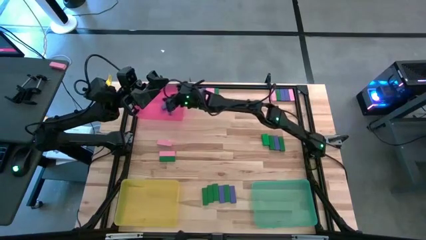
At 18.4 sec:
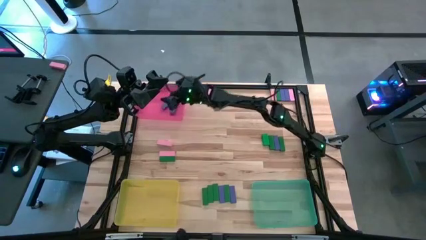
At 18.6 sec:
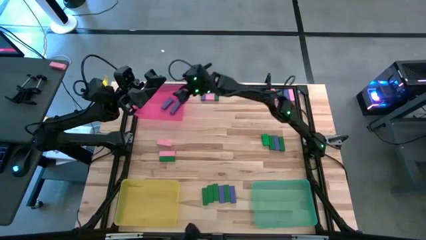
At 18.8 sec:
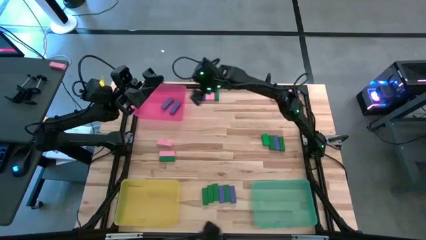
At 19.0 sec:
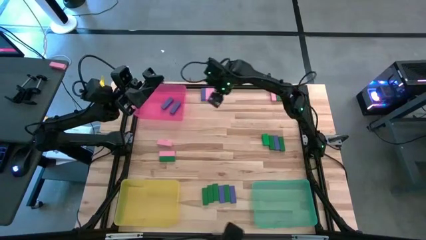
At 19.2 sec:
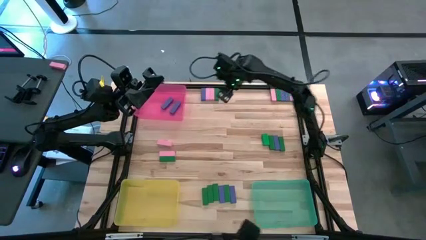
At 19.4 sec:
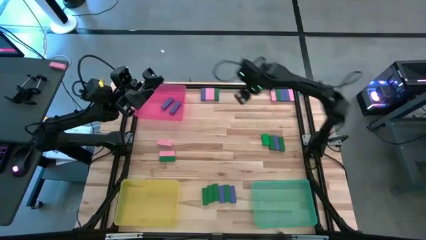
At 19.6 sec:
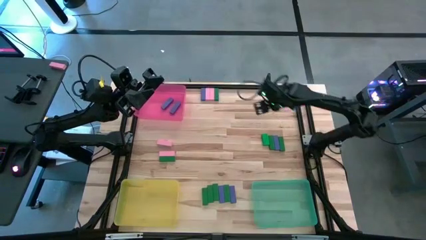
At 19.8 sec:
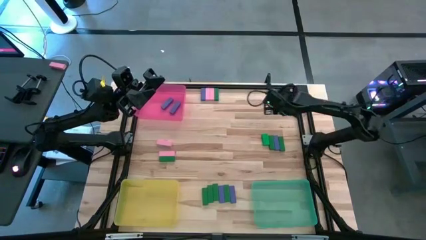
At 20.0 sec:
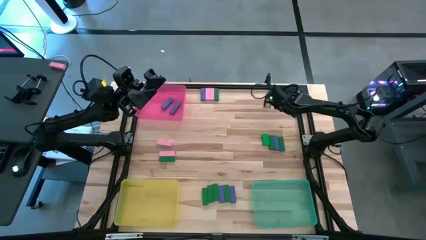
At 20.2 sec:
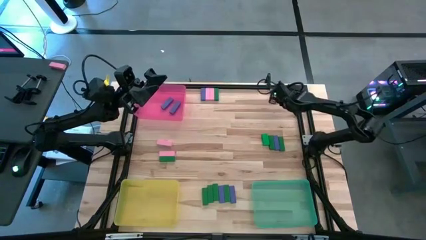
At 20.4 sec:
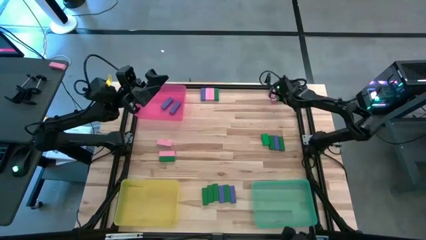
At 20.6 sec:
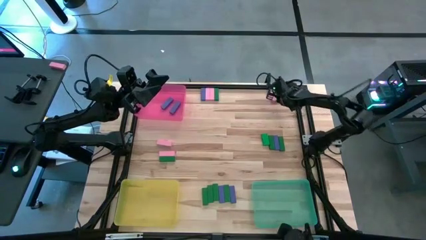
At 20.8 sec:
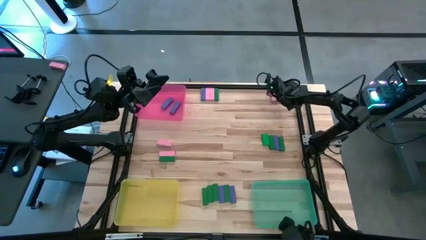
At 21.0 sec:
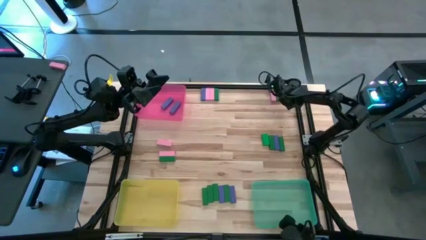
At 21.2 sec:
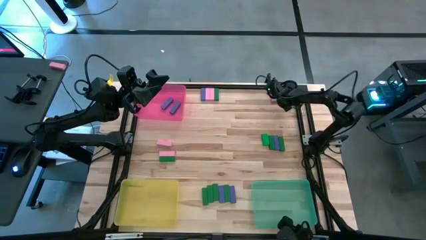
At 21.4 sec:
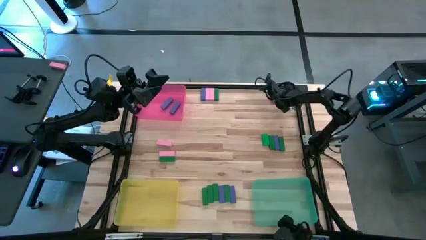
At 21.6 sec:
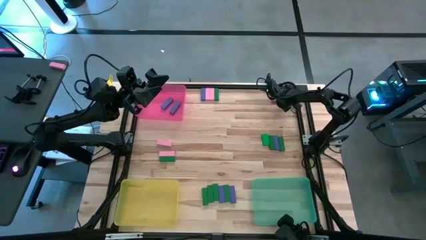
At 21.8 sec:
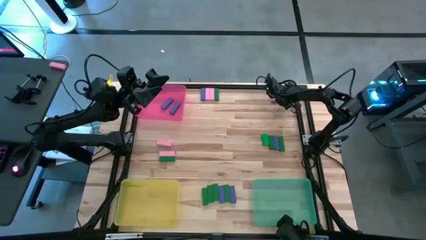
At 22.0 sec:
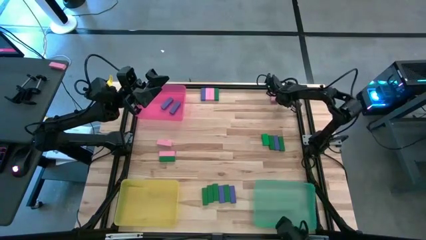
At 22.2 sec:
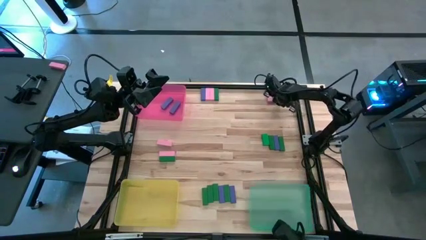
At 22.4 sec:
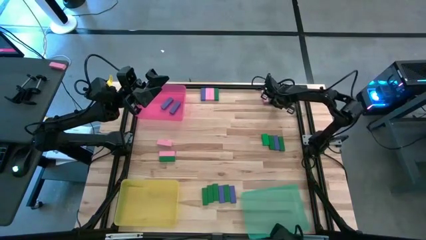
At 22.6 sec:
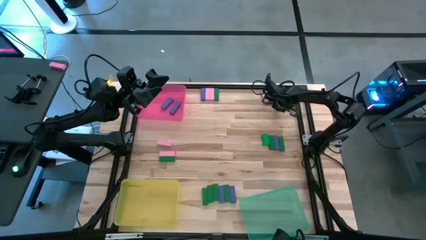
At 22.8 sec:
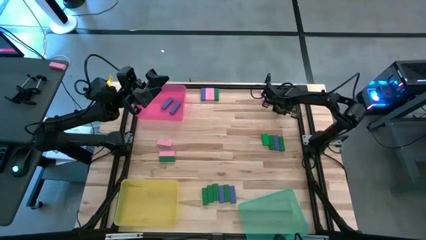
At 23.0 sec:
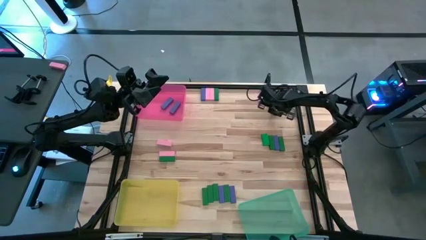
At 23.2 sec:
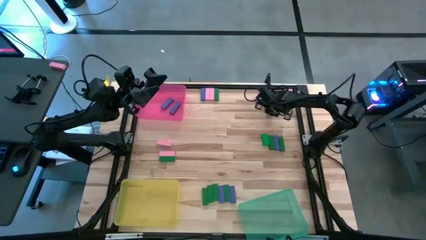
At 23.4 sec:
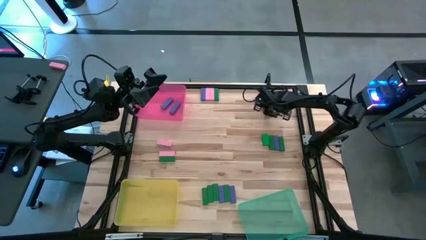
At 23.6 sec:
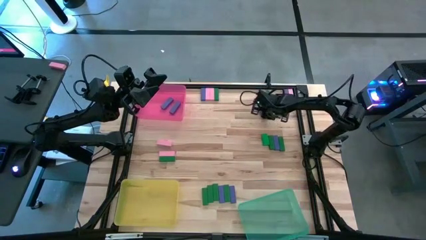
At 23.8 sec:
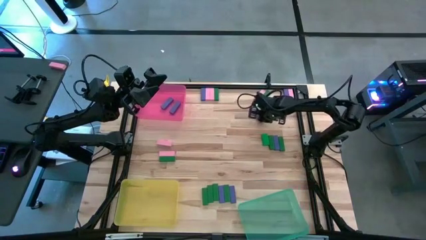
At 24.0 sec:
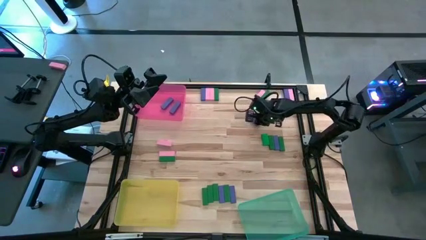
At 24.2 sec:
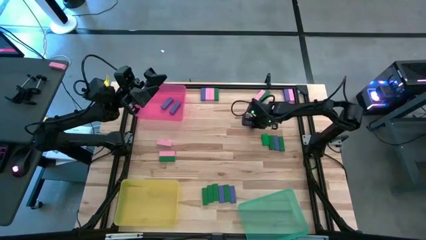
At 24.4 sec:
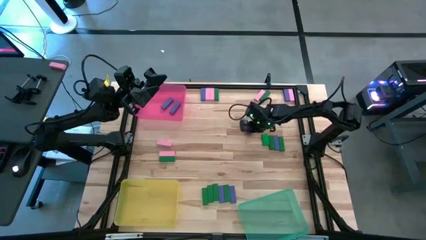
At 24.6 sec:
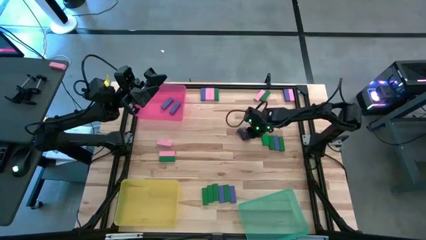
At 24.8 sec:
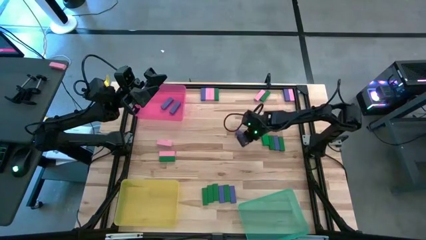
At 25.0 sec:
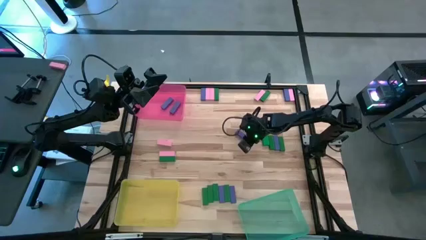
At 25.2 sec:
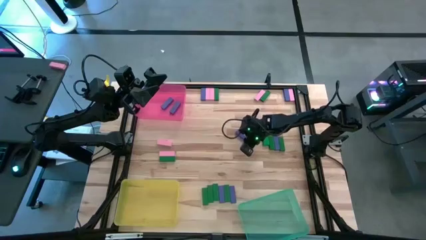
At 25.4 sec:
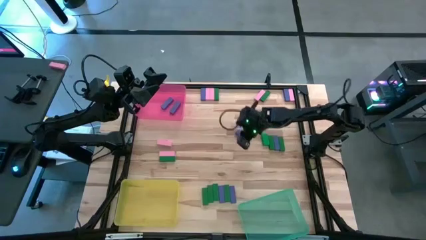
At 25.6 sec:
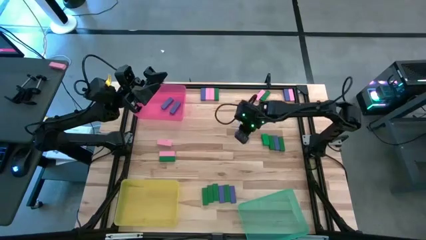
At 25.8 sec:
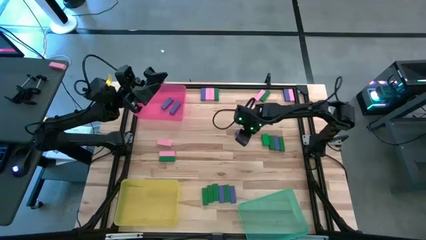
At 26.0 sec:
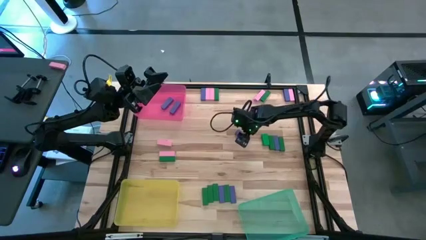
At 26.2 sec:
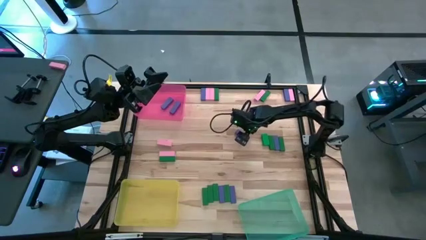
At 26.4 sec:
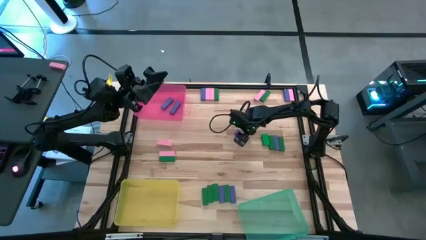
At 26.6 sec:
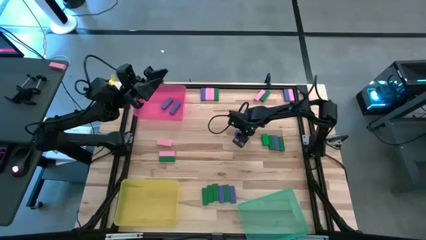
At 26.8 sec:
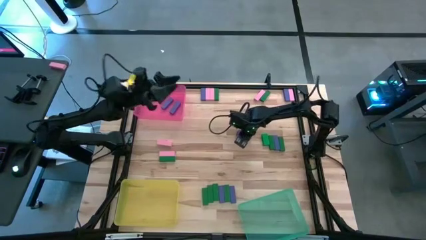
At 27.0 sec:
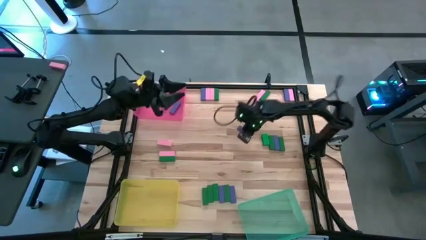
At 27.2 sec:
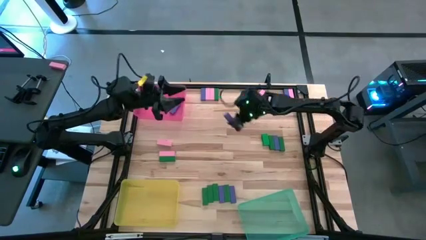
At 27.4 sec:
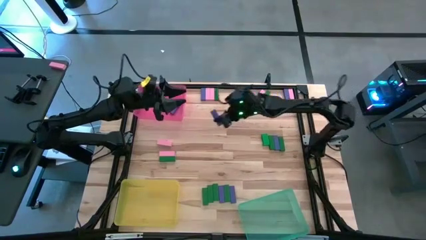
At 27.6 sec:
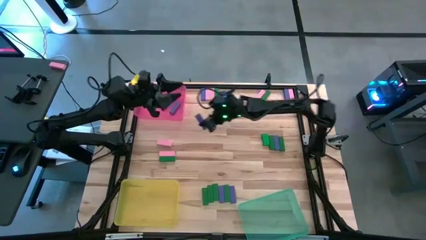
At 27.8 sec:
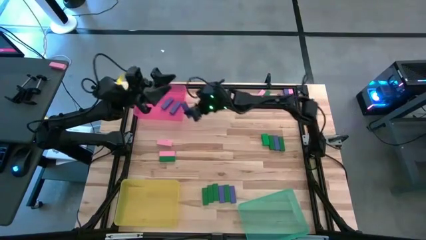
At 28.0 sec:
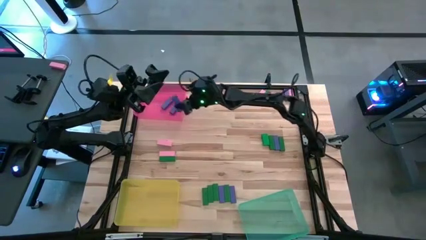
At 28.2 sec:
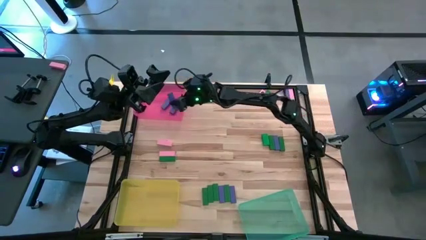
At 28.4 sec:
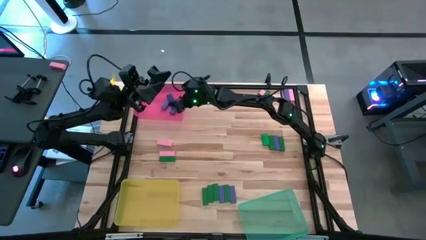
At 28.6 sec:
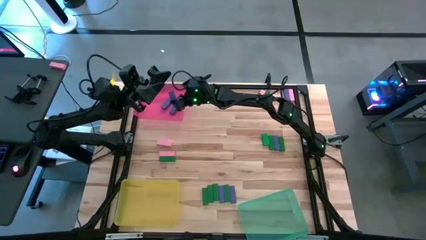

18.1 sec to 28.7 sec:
Task: Sort blocks
Put the violet block into the pink bin
